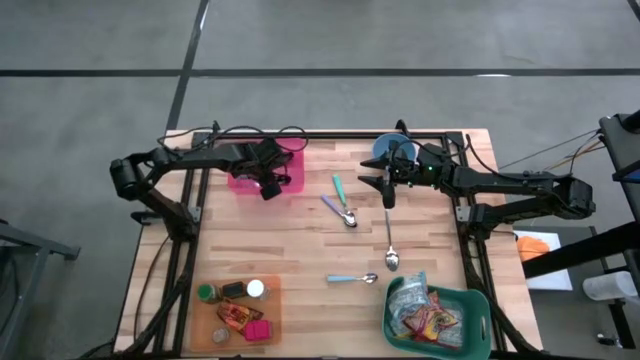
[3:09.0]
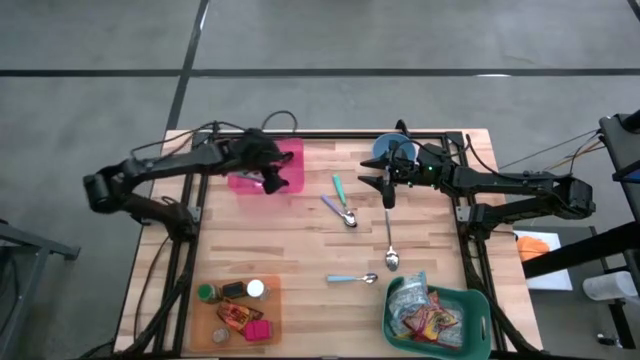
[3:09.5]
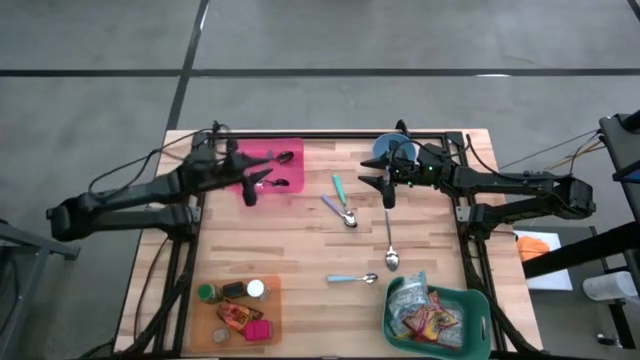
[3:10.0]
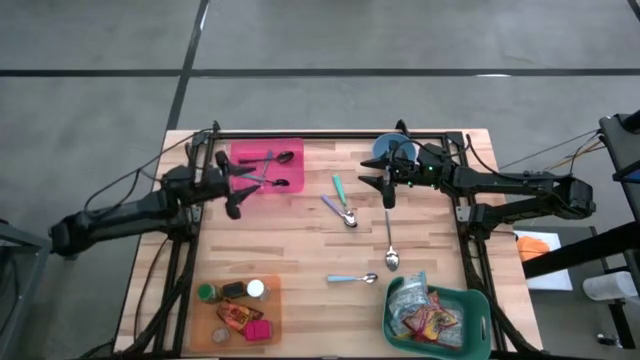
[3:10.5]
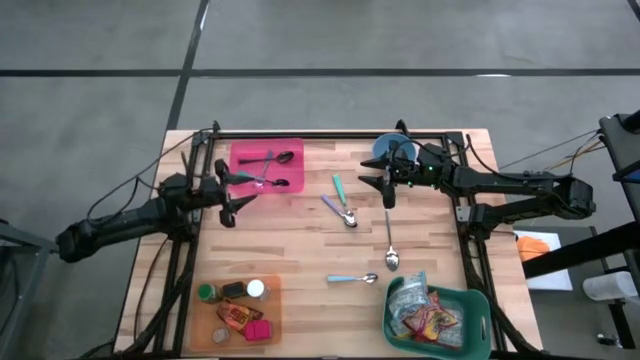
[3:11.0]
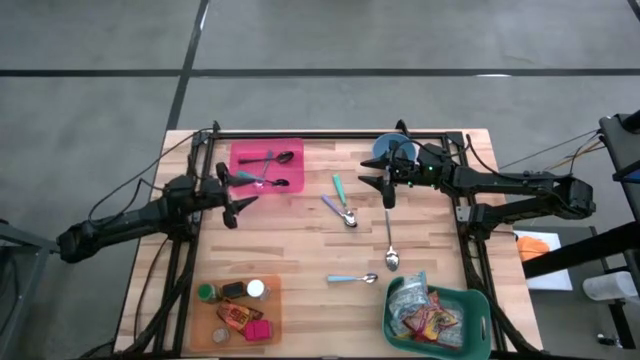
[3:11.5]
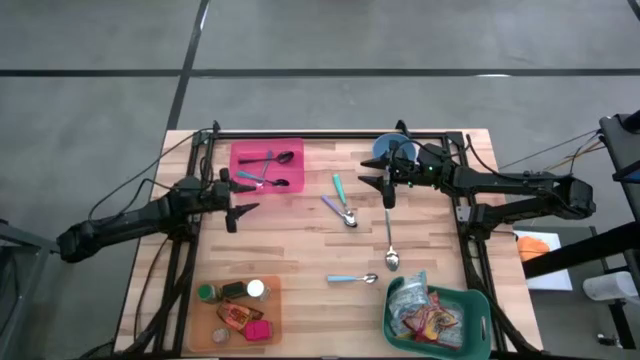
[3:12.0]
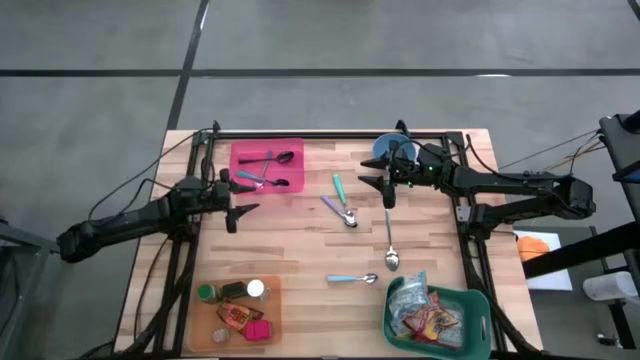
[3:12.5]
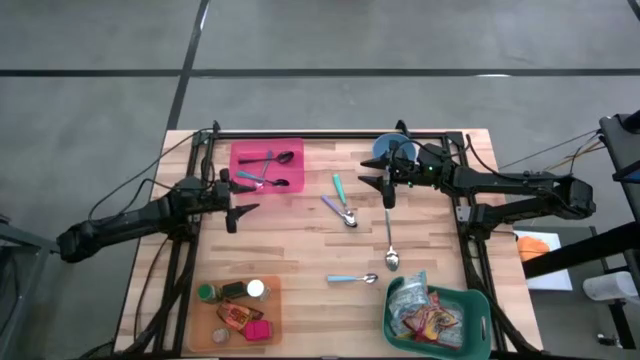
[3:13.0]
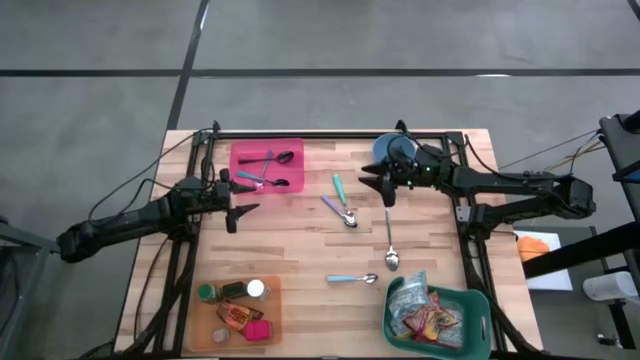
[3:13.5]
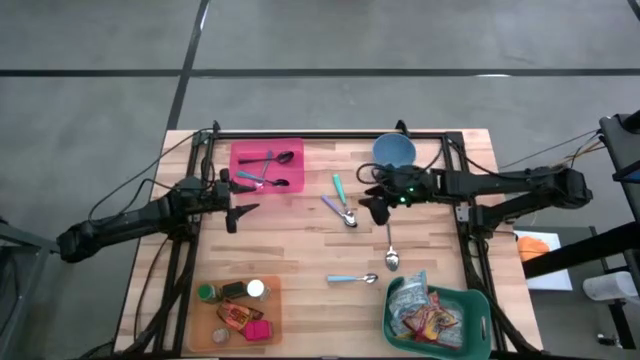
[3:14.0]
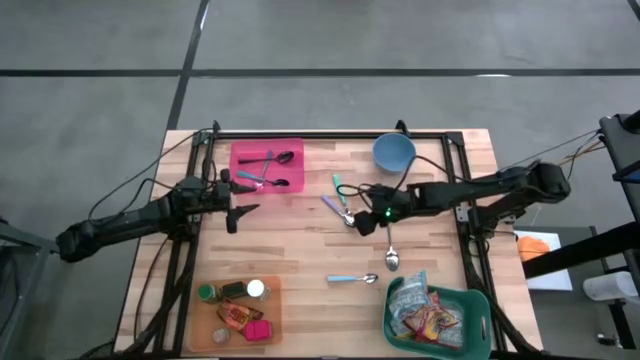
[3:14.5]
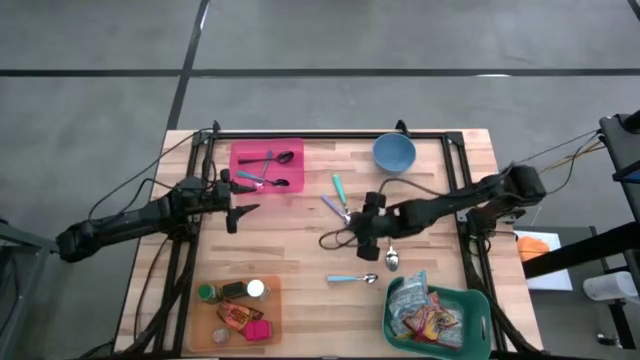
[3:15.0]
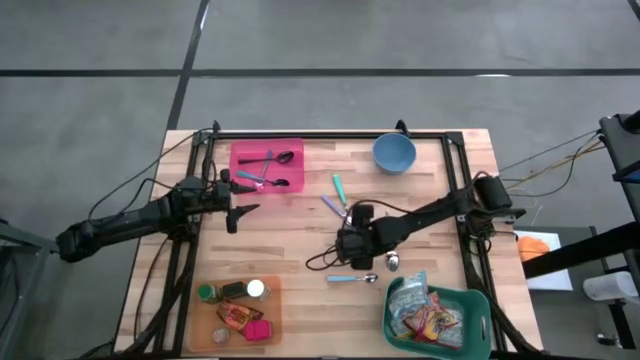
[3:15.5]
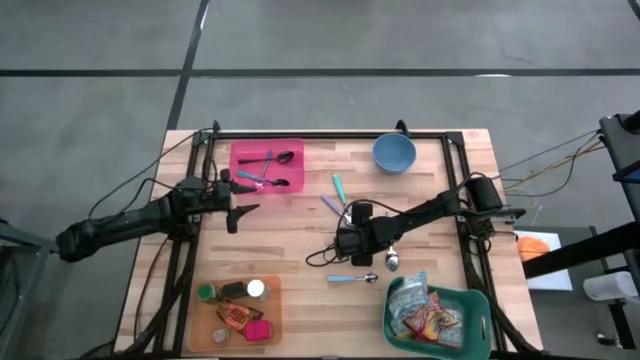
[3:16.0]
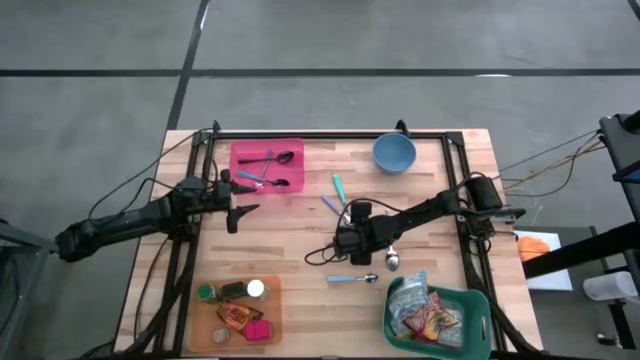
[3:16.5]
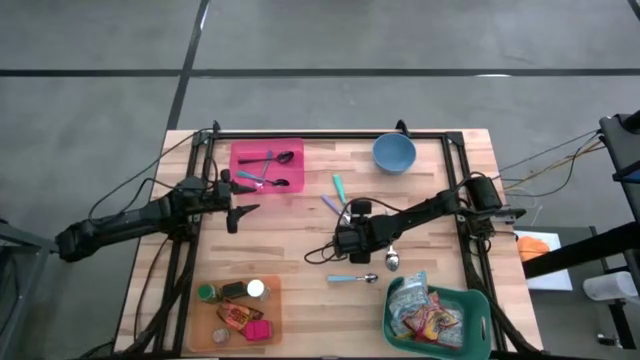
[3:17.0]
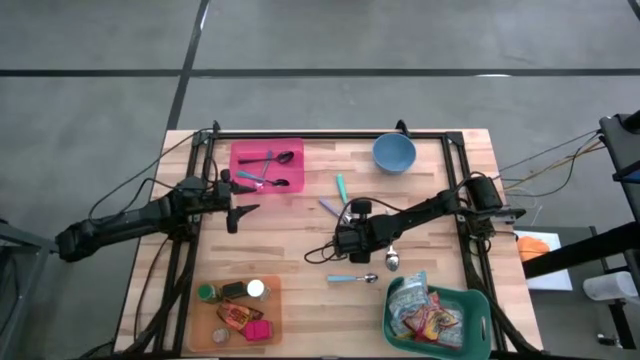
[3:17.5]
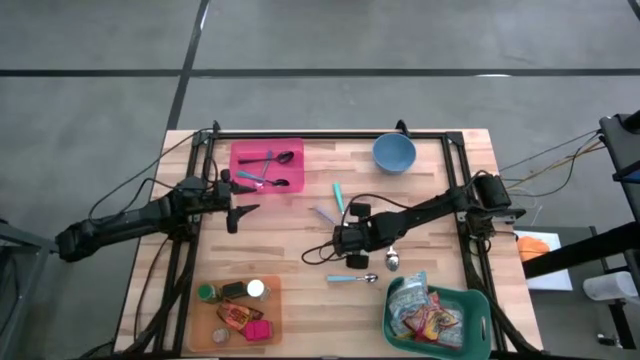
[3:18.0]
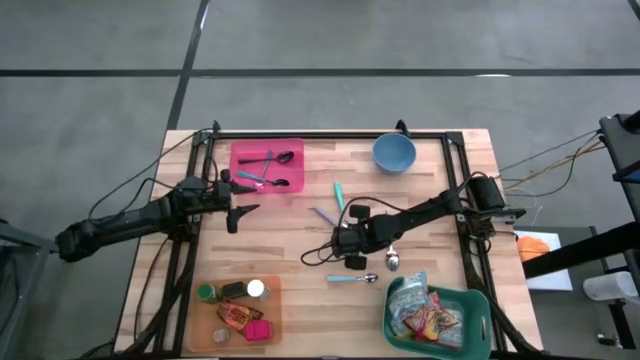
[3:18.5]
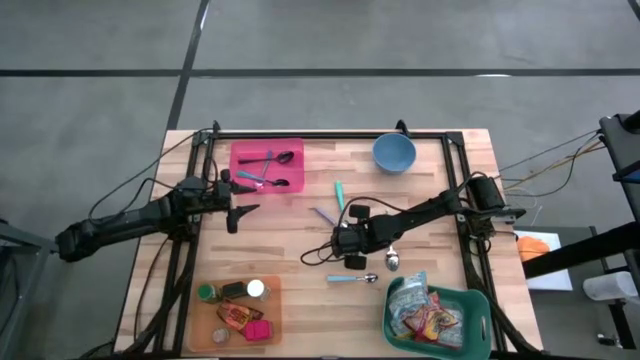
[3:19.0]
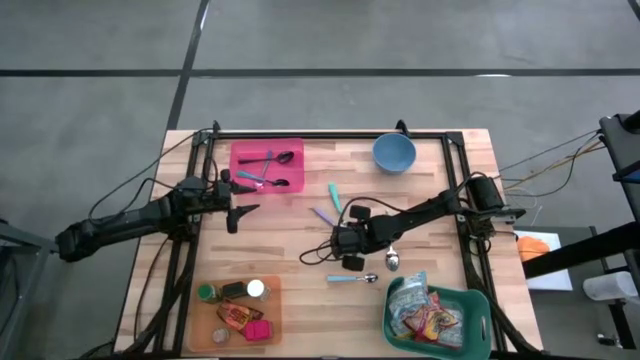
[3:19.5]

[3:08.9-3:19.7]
Put the green spoon into the pink bin

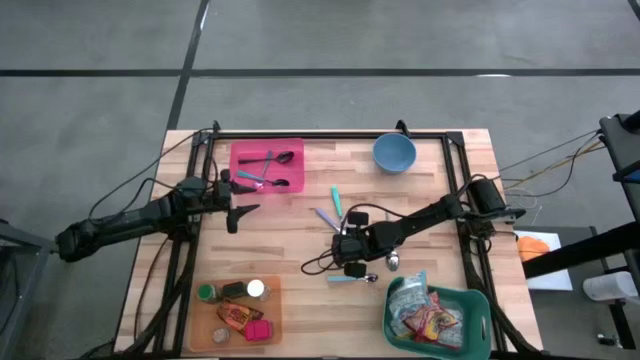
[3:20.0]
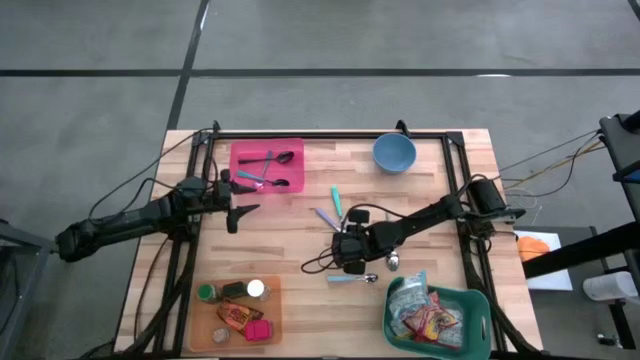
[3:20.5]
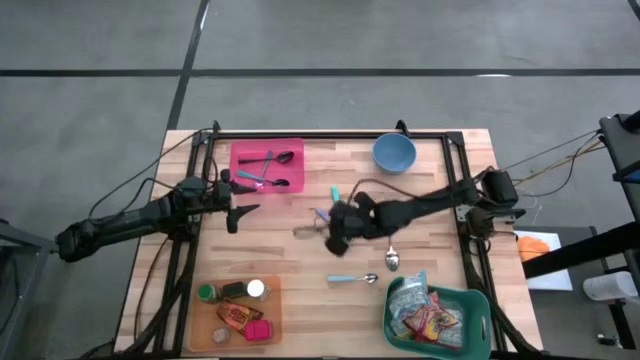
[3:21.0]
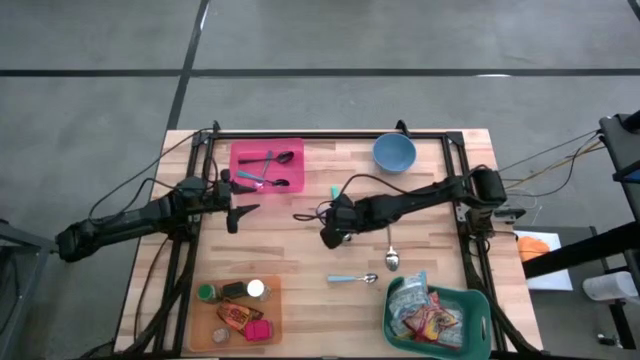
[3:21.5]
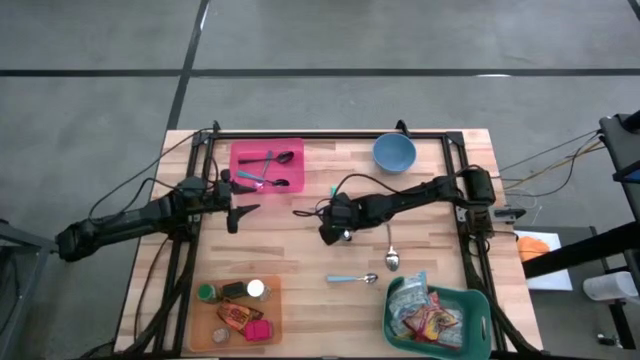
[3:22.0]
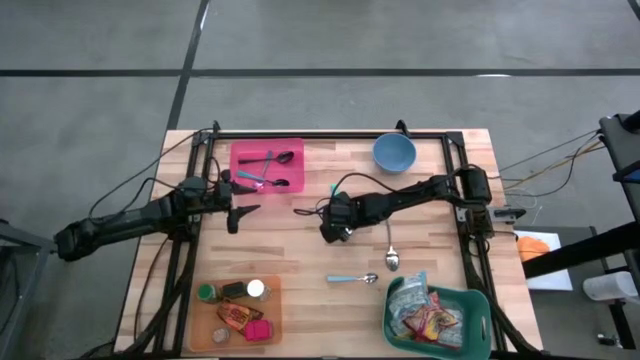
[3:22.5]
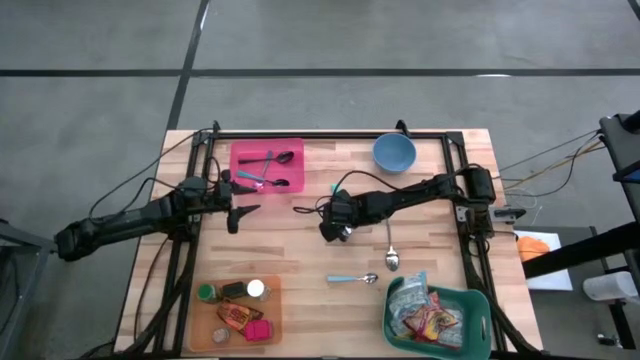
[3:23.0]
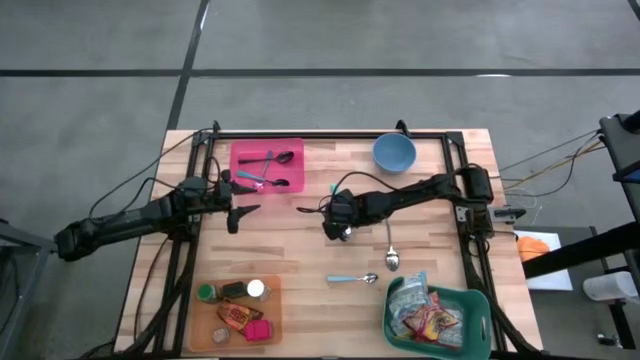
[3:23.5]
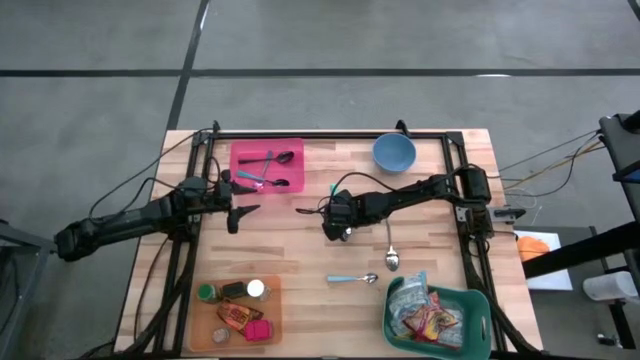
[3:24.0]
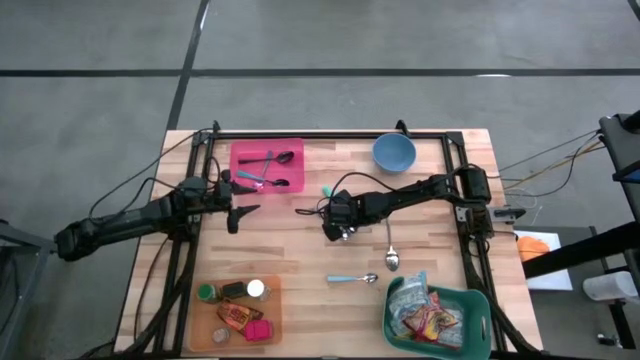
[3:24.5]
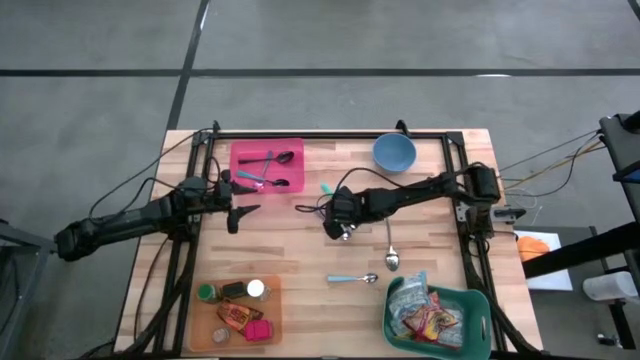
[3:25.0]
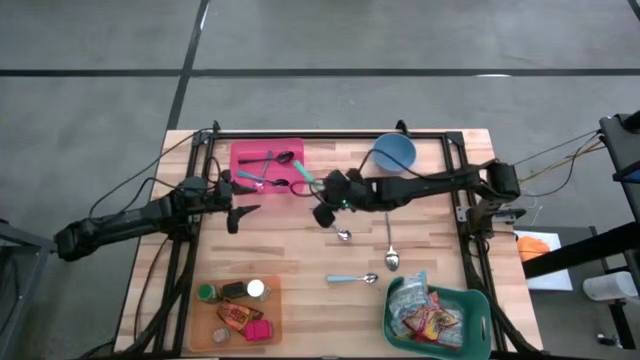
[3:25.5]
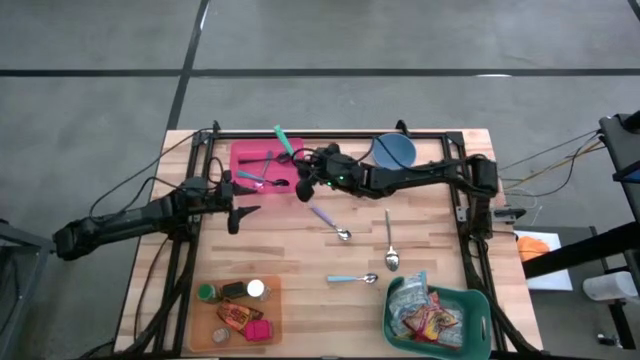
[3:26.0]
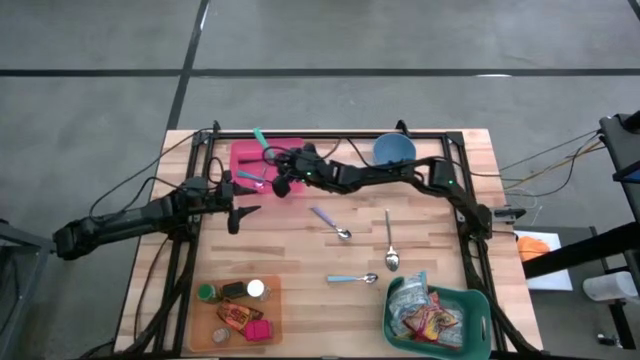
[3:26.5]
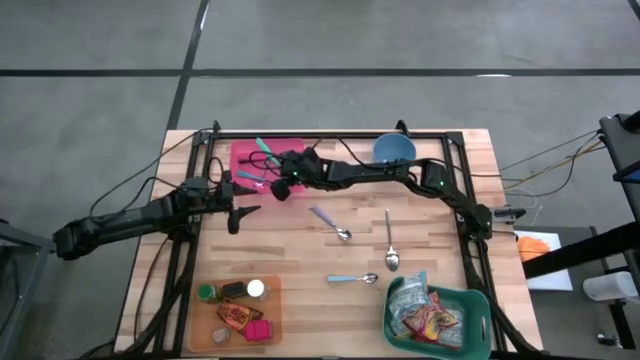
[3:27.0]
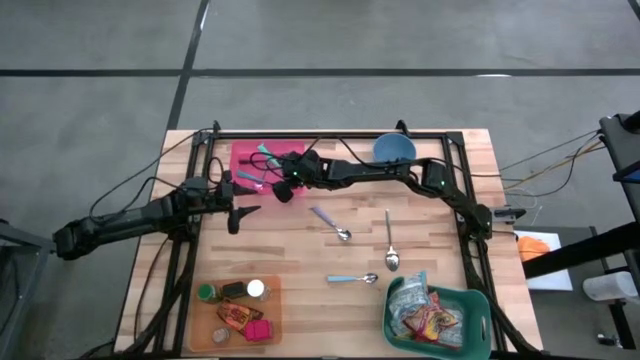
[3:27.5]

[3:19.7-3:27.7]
Put the green spoon into the pink bin
